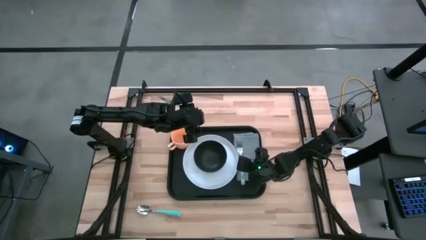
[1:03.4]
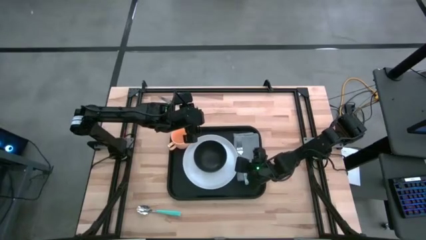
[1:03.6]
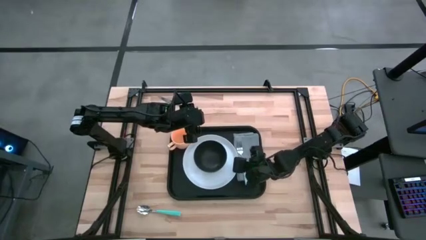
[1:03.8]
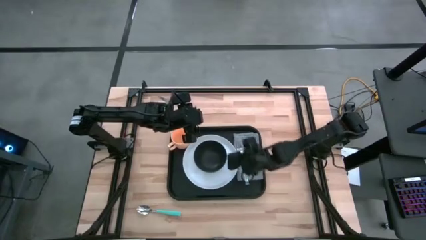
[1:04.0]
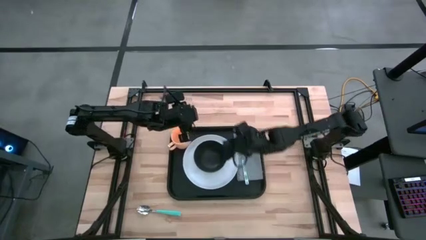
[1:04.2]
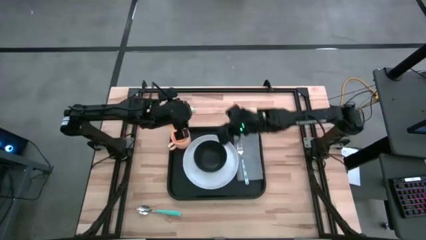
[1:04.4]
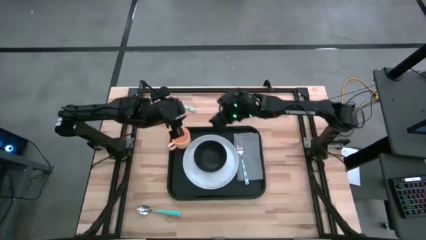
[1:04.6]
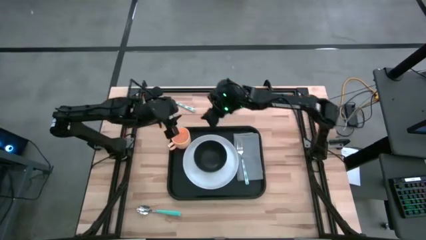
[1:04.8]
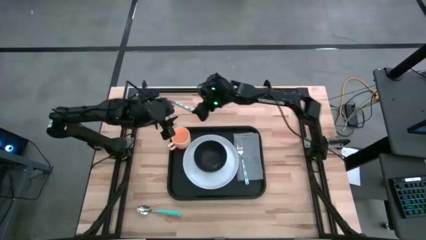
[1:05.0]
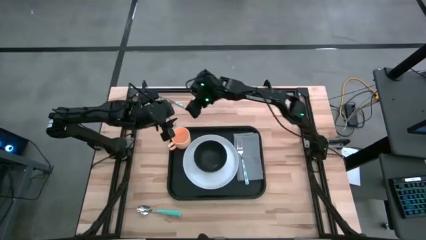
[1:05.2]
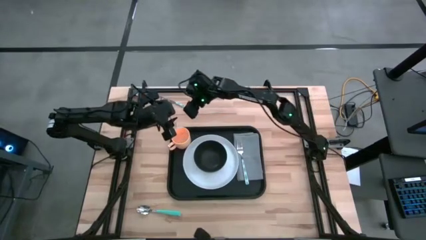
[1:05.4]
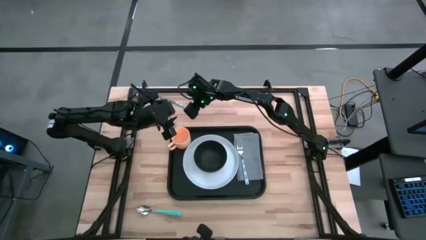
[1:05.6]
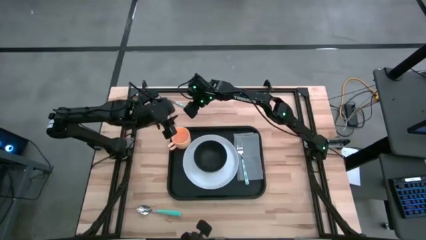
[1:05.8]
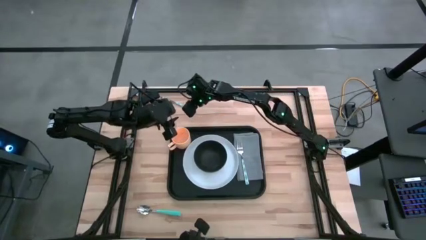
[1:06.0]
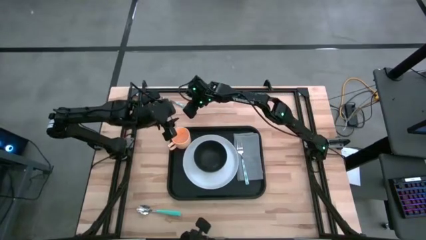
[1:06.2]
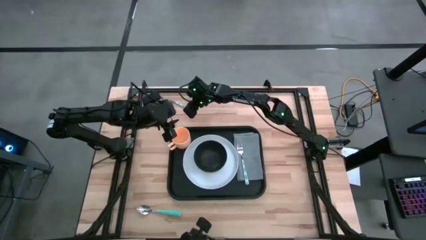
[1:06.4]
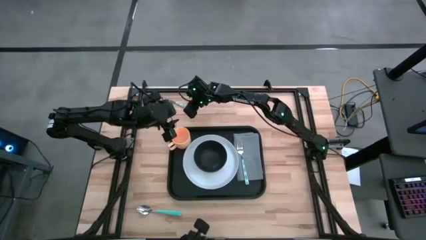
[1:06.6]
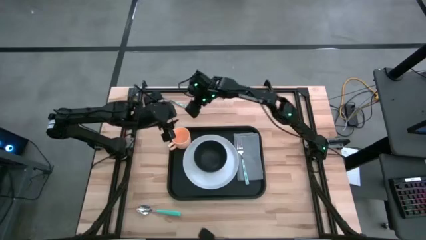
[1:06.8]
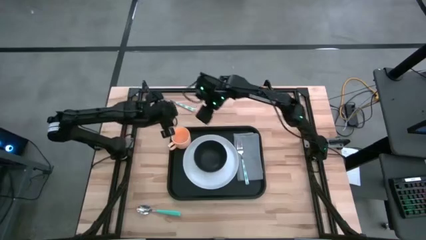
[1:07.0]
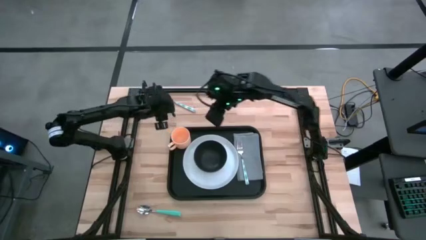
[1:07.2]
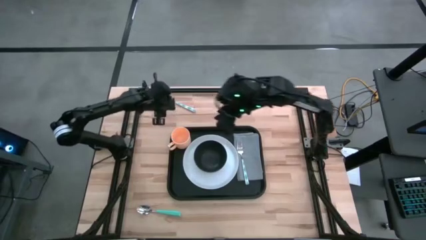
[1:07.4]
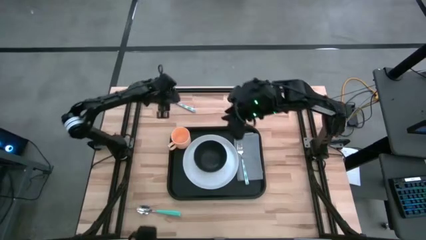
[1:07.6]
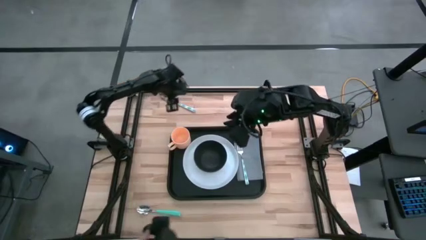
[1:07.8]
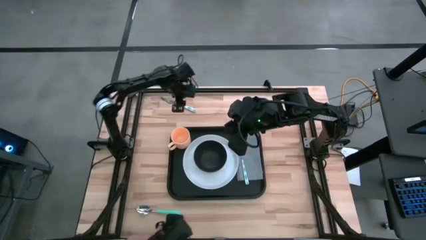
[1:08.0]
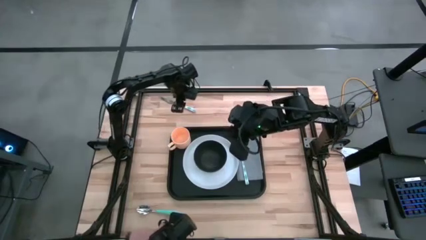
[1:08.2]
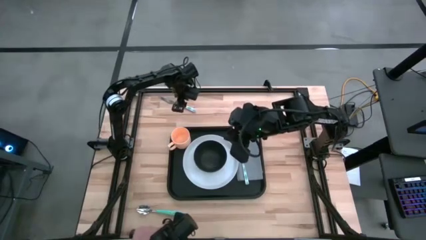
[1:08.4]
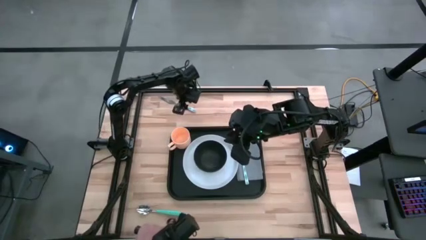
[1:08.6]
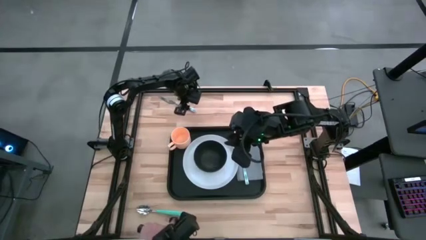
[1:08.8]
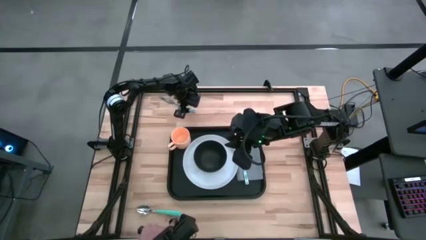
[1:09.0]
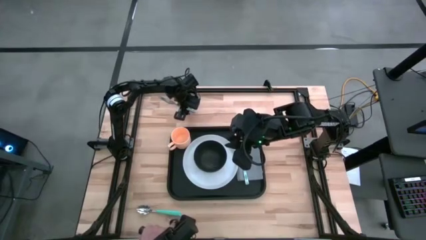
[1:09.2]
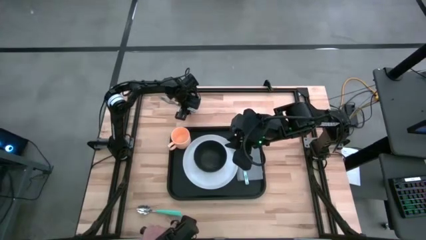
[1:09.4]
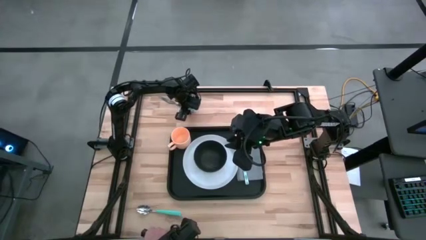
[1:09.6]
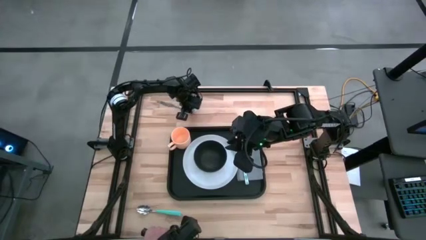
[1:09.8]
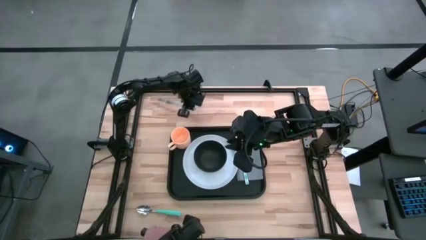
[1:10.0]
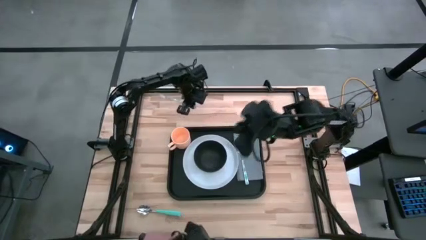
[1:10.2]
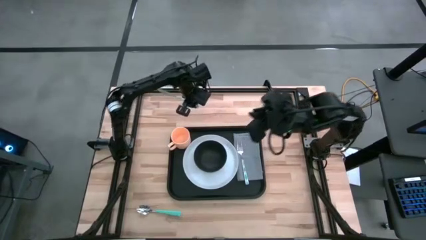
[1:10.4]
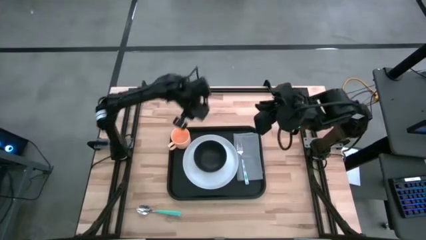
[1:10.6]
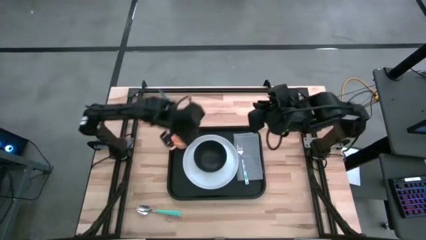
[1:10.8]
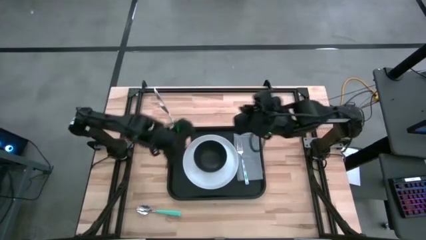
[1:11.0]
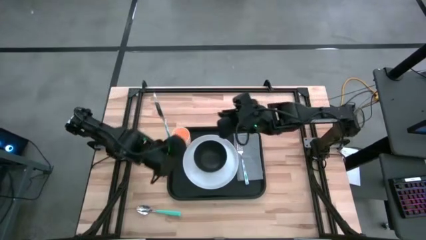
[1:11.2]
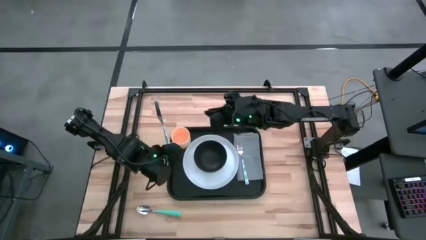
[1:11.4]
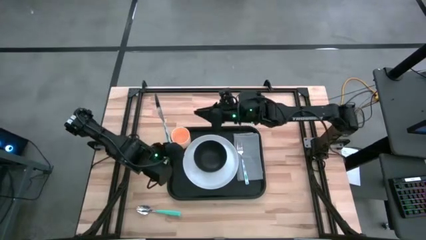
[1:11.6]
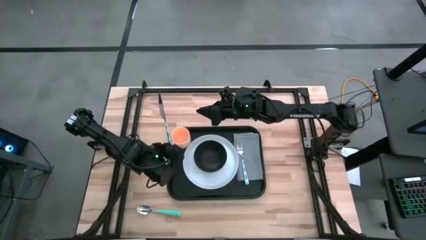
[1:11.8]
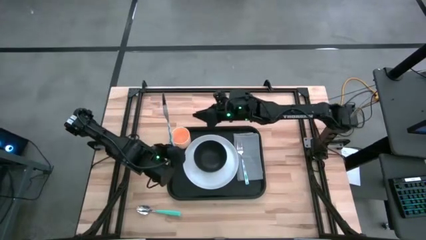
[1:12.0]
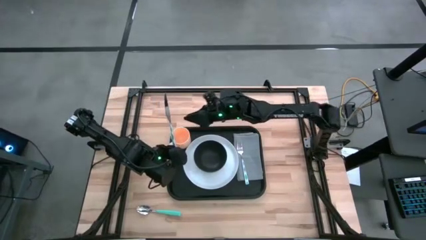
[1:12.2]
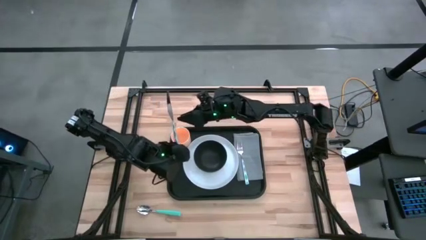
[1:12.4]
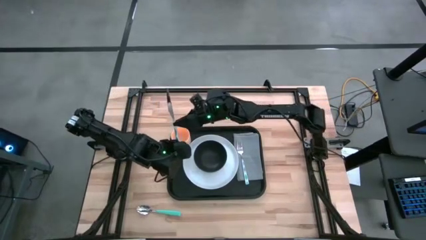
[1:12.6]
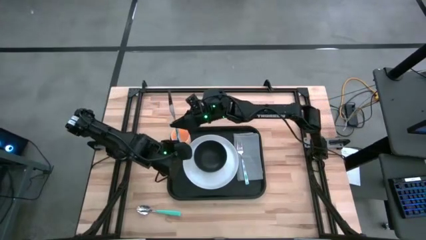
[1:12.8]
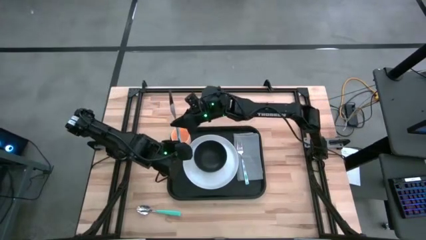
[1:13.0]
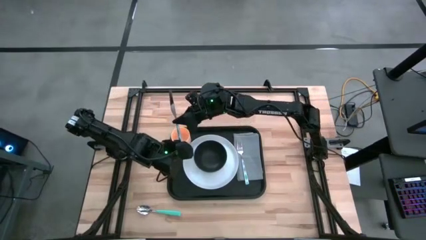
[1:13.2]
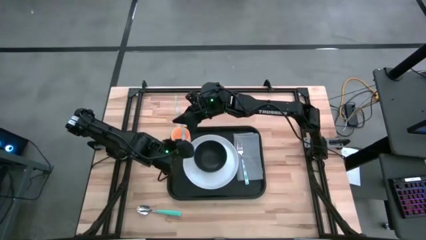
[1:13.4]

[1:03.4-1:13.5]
Task: Set up tray
Put the white blue table knife on the gray table napkin to the right of the white blue fork

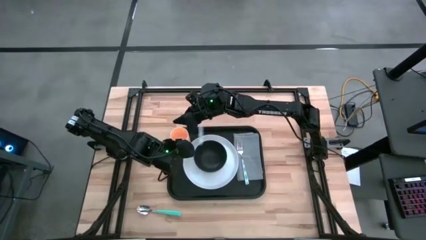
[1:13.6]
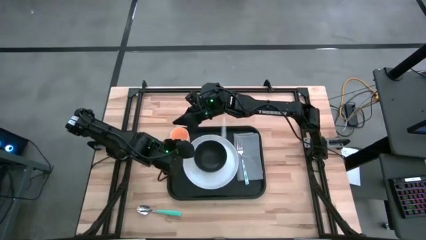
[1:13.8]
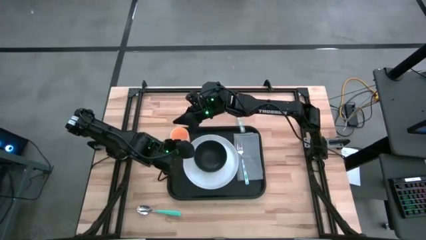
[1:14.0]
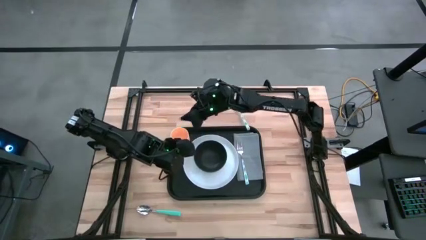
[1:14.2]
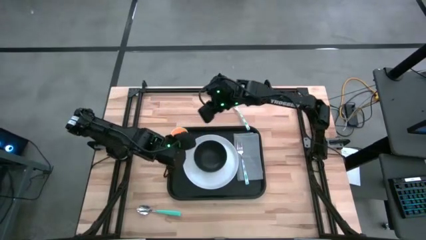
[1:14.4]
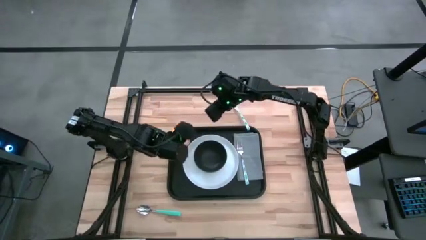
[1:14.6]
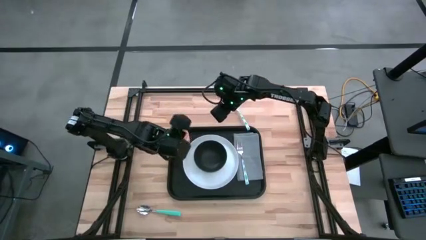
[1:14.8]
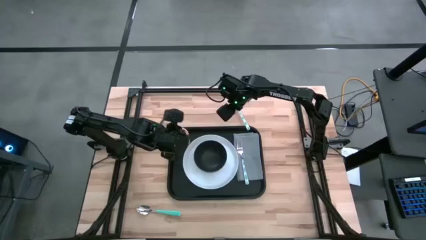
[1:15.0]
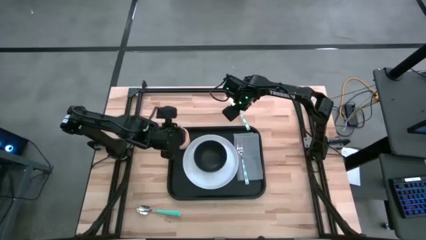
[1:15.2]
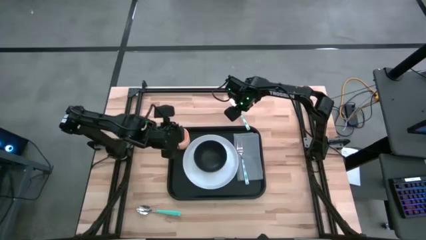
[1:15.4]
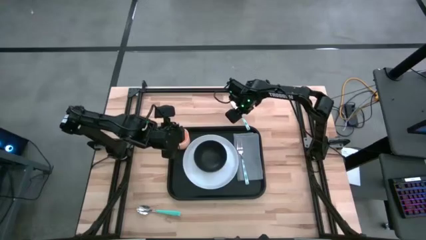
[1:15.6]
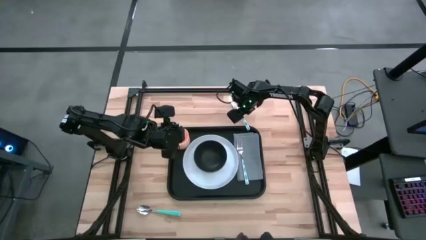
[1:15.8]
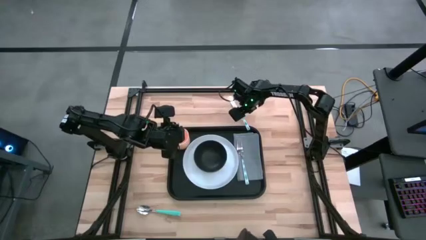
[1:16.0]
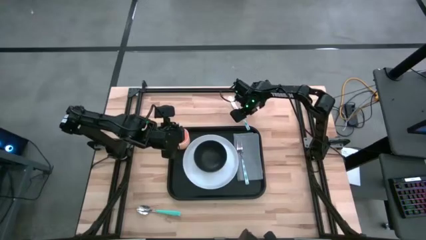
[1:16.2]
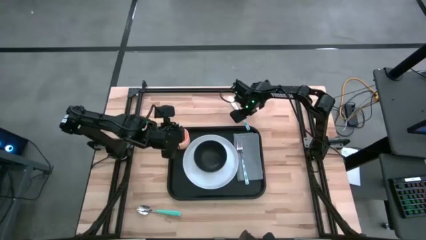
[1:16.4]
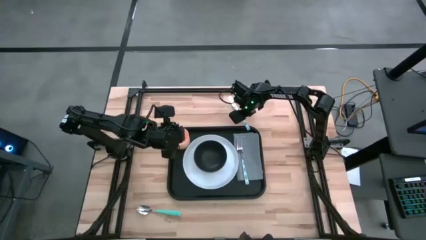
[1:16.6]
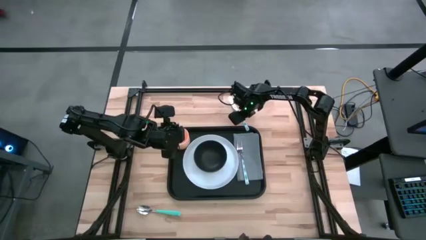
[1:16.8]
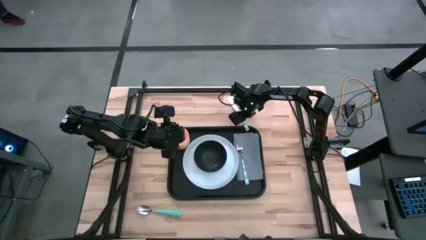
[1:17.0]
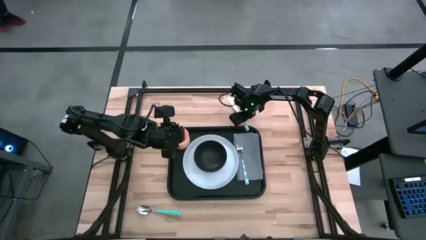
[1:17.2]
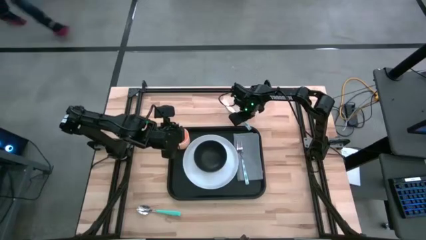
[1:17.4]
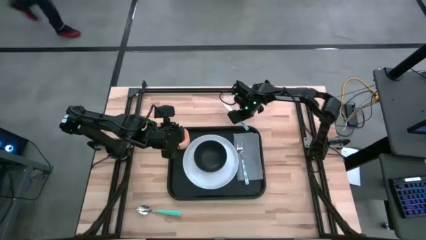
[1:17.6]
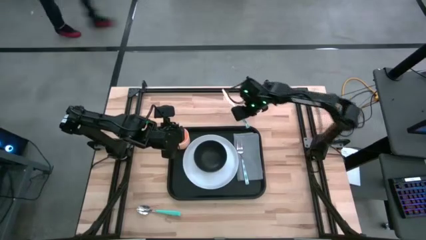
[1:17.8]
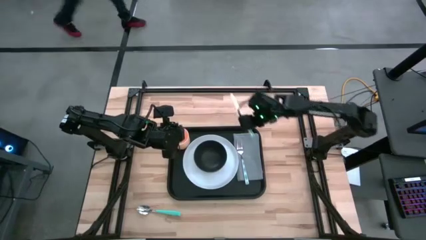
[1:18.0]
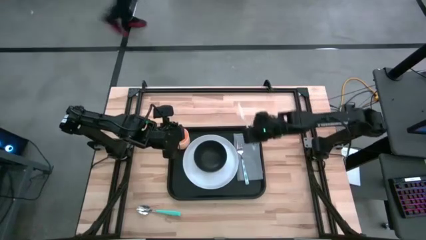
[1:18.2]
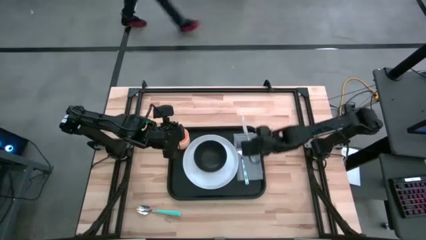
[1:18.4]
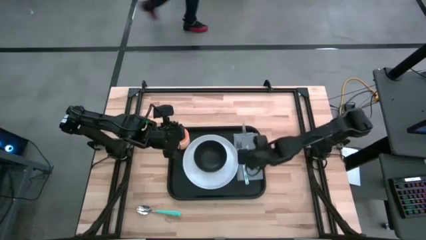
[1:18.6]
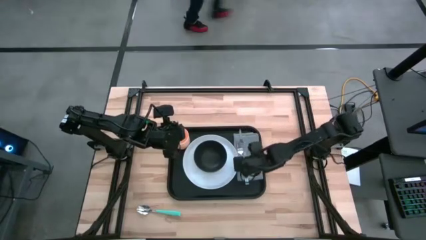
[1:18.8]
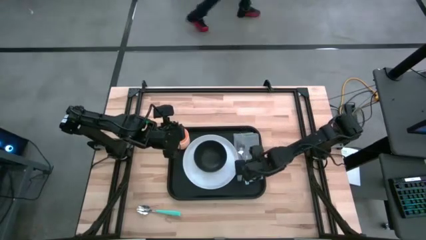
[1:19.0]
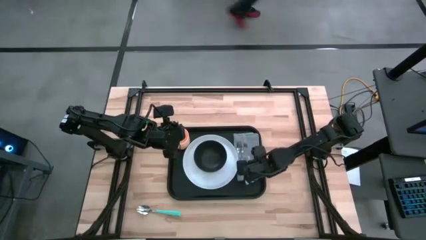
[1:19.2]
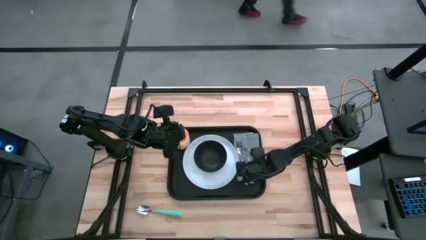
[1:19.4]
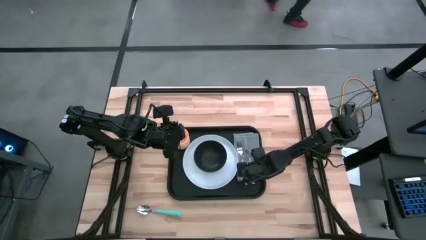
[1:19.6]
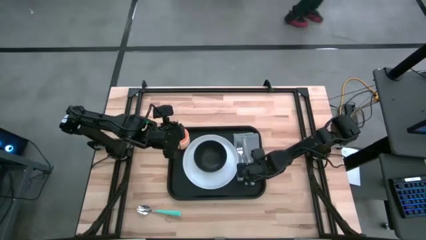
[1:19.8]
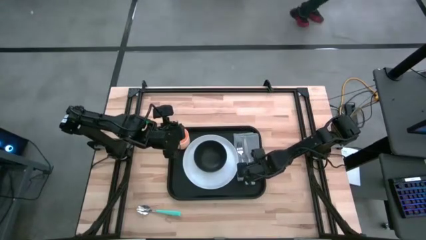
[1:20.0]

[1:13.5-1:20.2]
Put the white blue table knife on the gray table napkin to the right of the white blue fork
